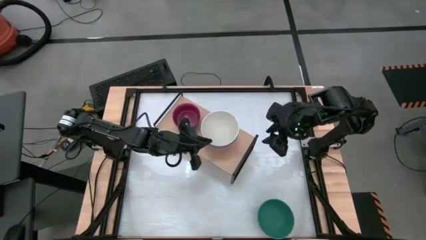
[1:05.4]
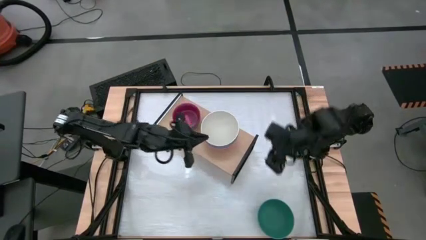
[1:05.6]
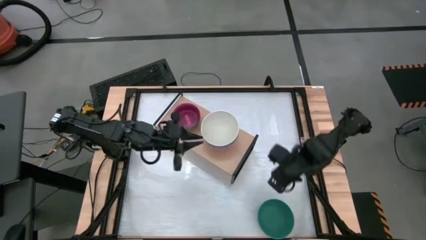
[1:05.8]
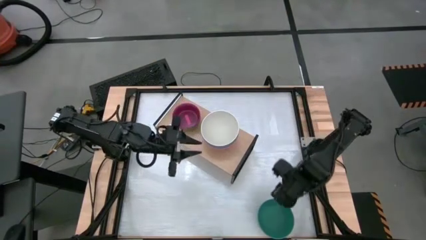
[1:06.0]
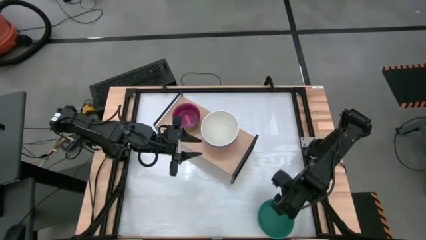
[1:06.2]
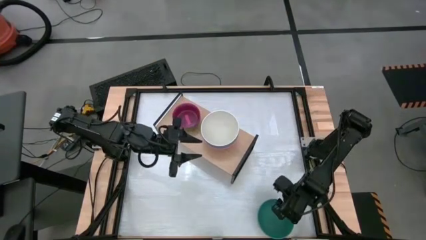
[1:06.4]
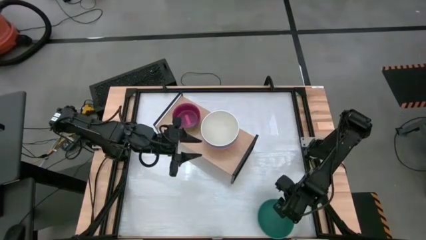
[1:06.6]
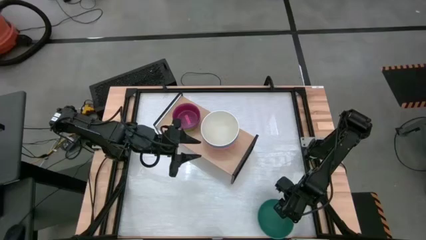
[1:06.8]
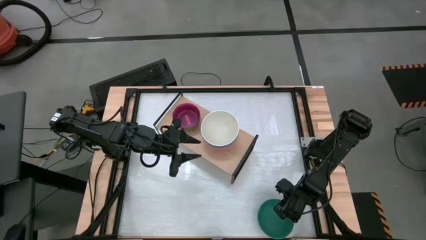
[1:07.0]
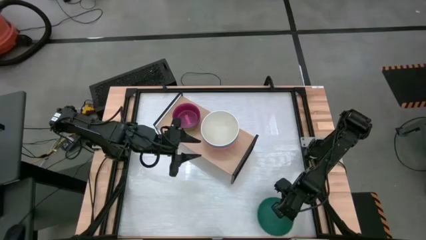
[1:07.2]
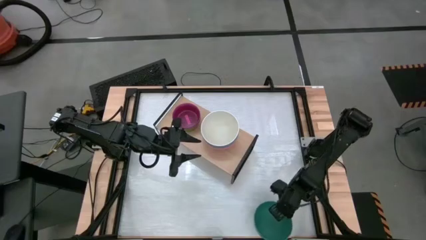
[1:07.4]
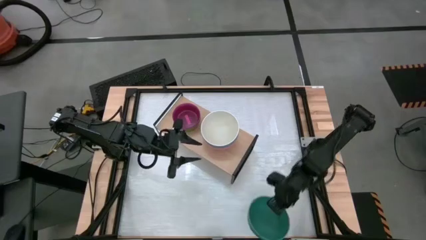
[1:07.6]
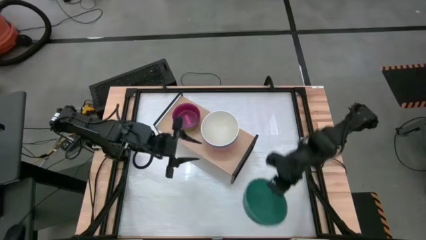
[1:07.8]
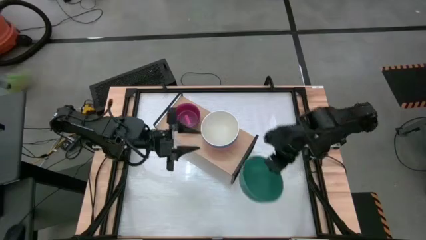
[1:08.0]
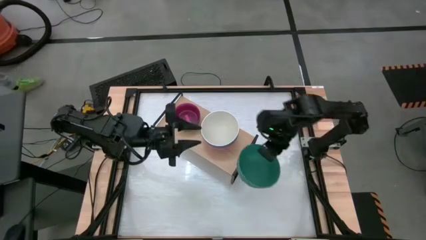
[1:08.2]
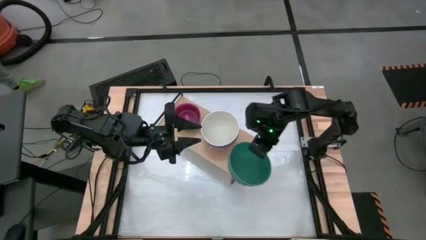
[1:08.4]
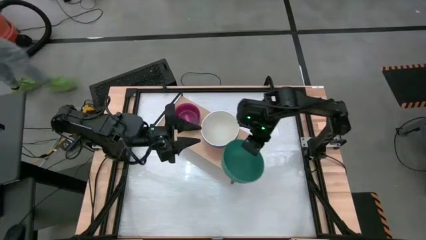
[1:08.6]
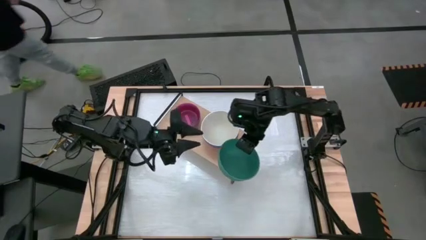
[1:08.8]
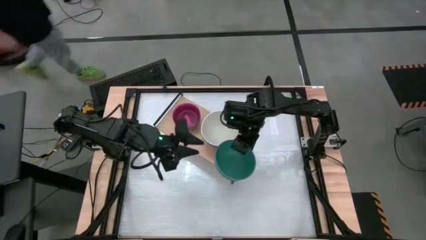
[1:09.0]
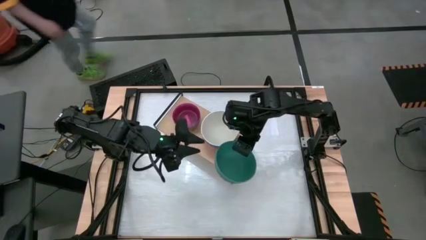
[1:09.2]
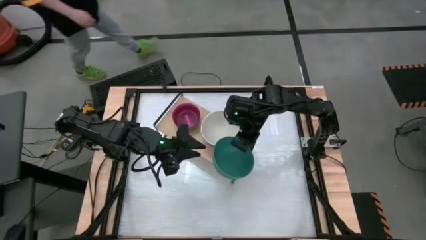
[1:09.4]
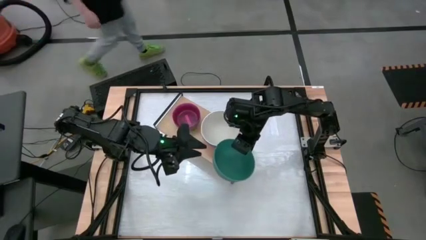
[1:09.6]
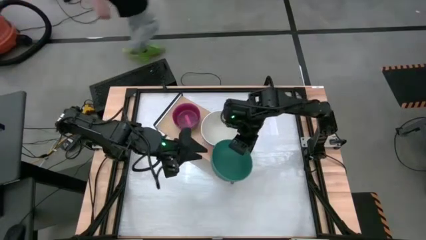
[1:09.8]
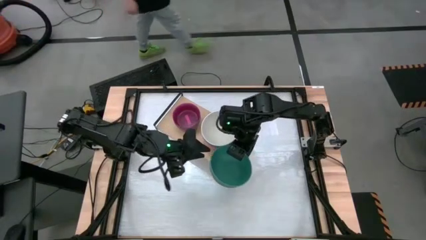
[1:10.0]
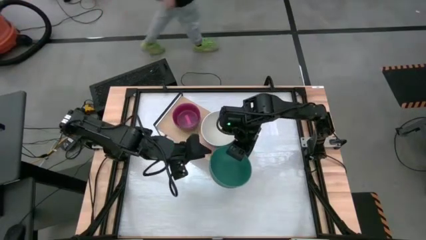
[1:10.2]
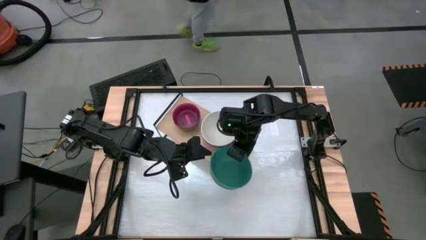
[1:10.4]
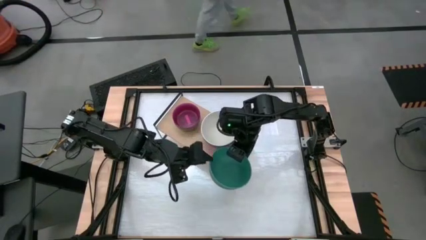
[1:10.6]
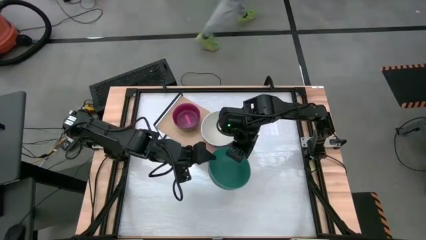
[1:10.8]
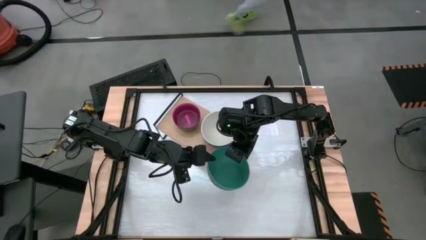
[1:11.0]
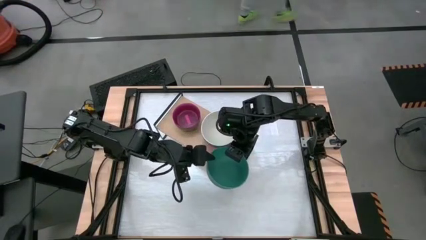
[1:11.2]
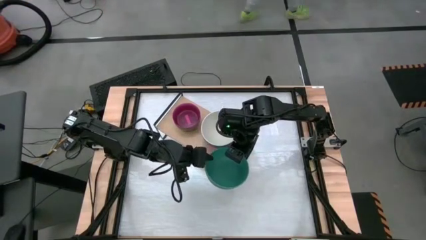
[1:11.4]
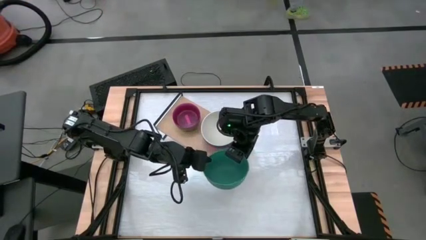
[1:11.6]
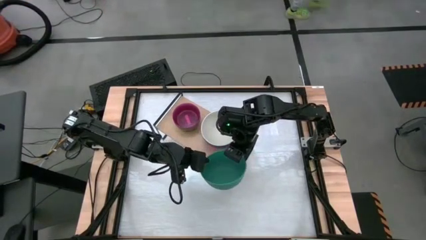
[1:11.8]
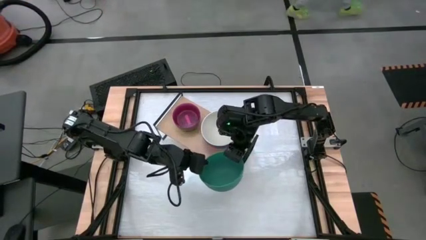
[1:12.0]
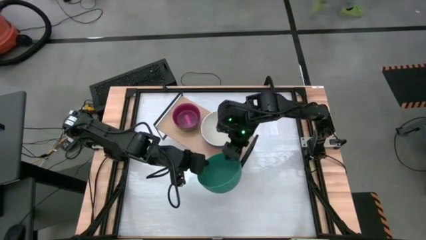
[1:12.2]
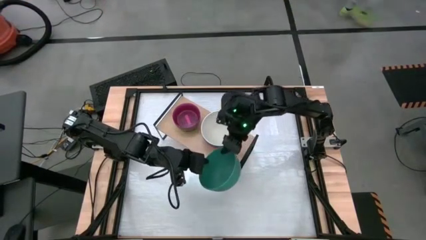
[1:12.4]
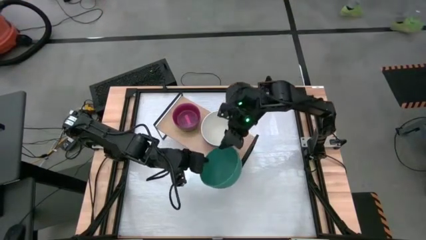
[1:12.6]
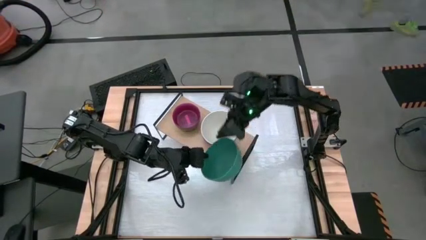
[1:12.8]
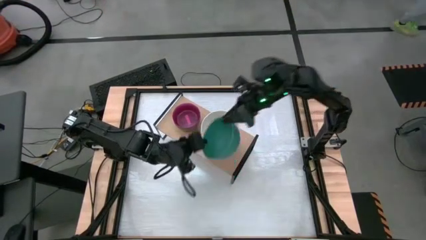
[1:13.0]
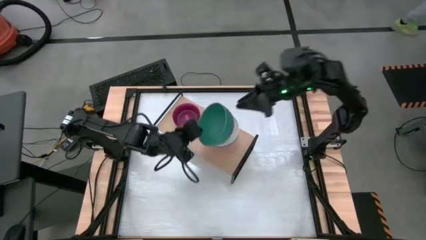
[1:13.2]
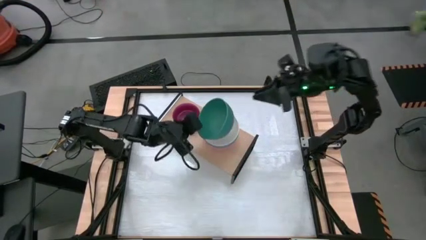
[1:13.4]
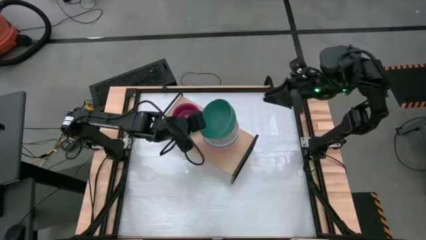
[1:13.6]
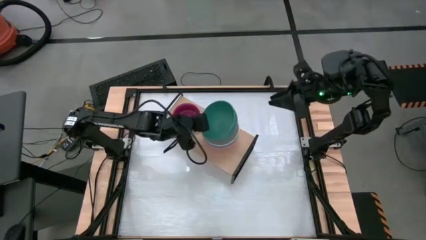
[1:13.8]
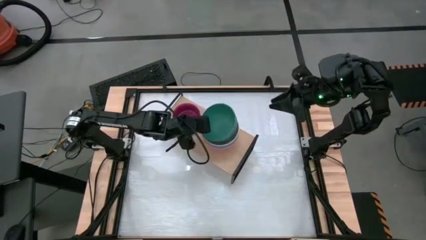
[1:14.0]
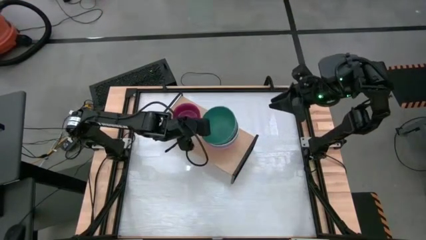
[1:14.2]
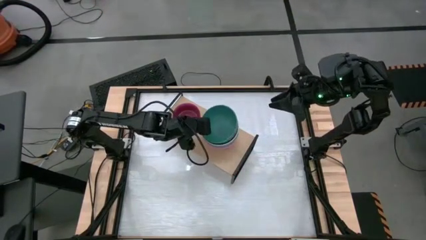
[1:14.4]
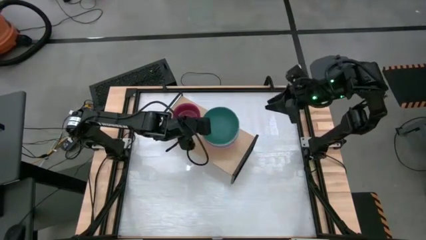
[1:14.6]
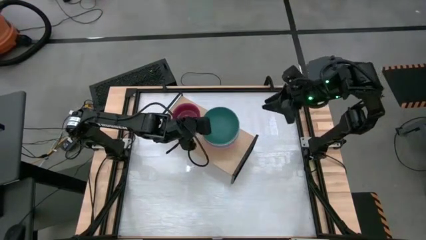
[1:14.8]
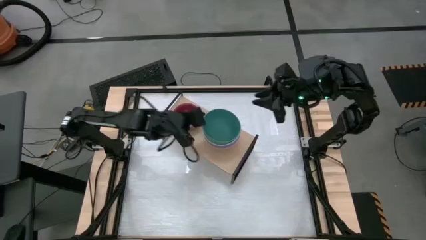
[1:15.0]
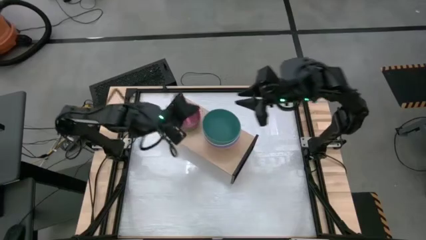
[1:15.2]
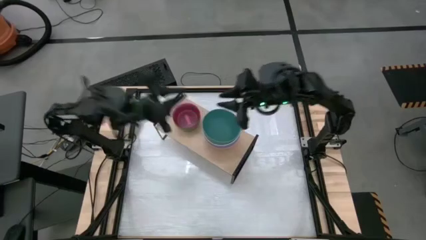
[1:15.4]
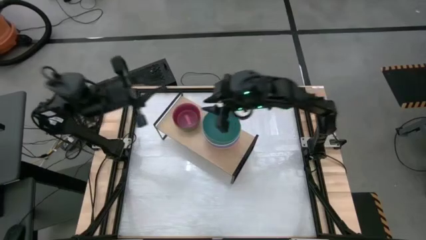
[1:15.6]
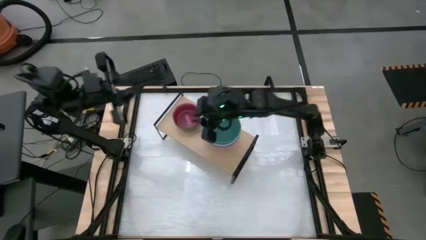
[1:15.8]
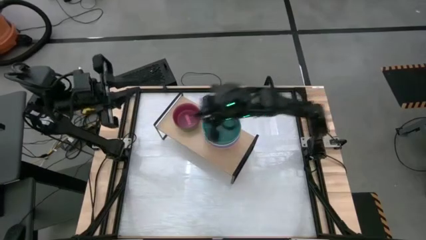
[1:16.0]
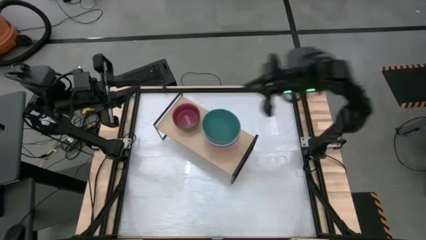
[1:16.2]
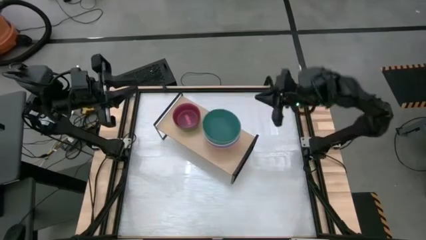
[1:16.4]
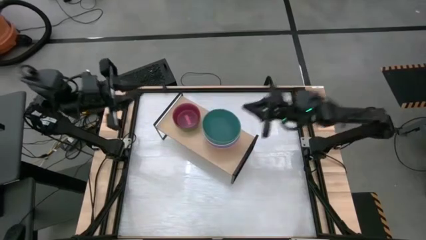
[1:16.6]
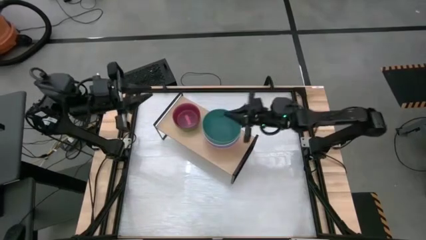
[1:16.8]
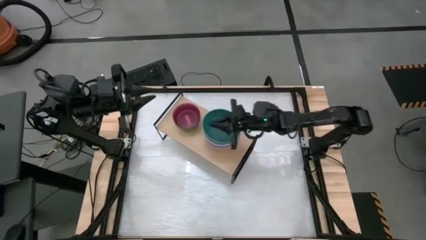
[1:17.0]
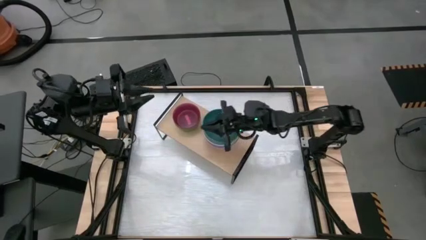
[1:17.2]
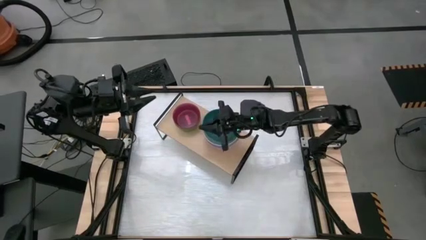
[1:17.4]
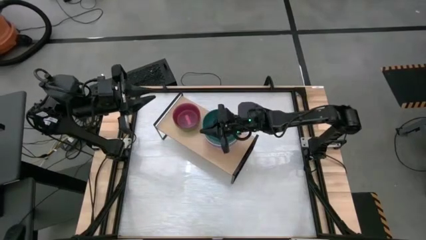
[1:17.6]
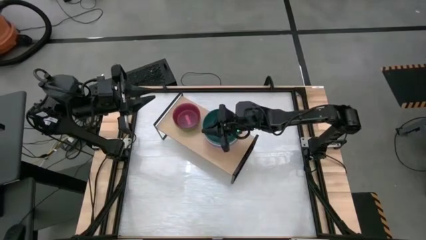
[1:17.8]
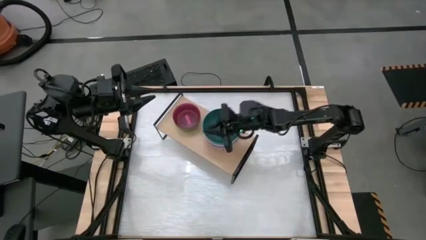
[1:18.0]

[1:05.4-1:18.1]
Task: Place and stack bowls onto a shelf
Stack the large dark green bowl on the top of the large white bowl on the shelf

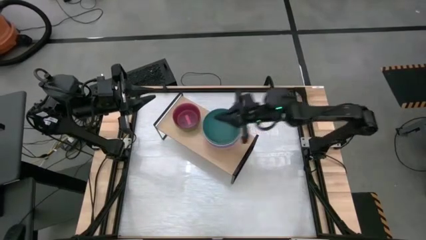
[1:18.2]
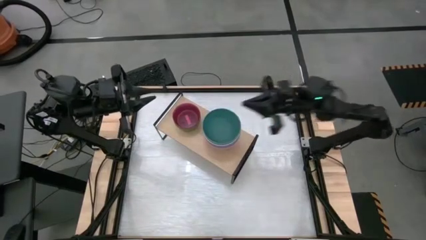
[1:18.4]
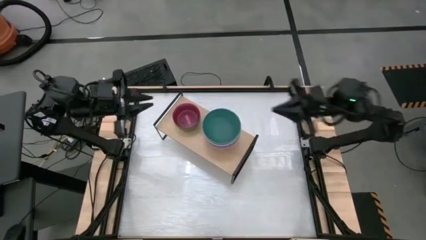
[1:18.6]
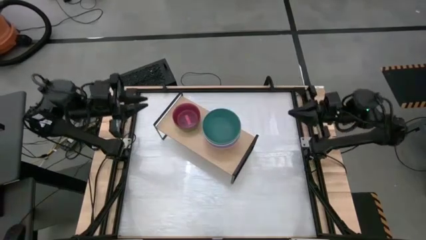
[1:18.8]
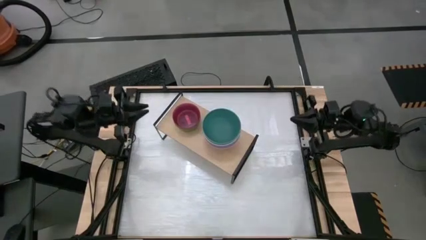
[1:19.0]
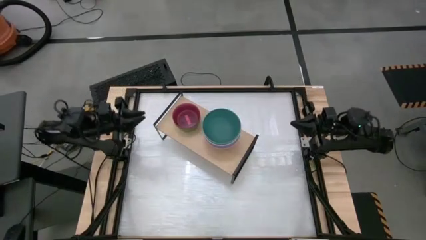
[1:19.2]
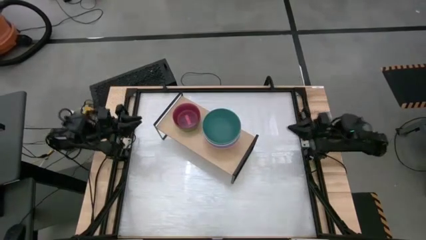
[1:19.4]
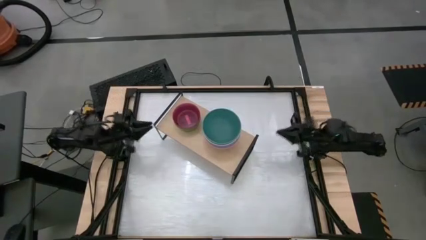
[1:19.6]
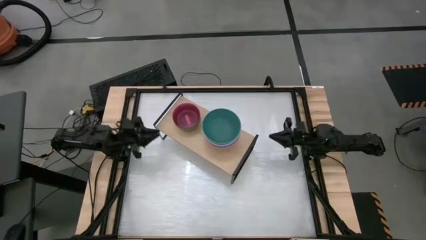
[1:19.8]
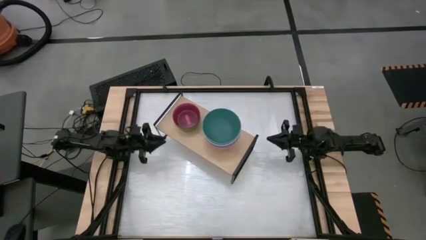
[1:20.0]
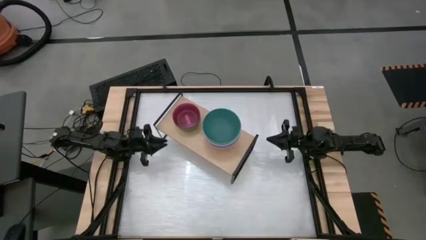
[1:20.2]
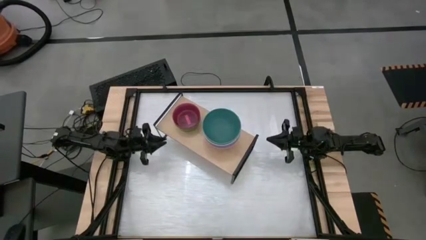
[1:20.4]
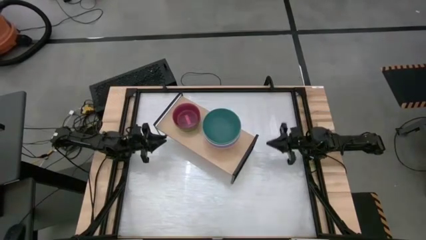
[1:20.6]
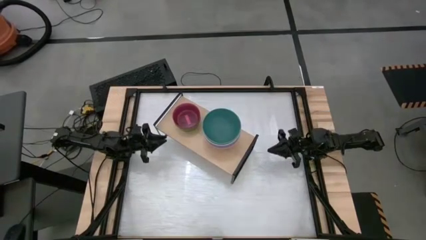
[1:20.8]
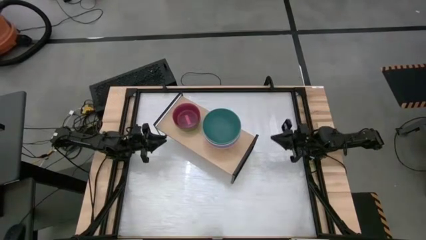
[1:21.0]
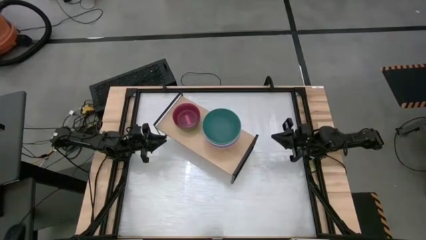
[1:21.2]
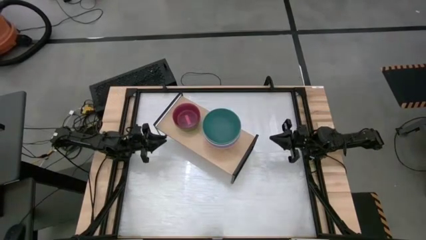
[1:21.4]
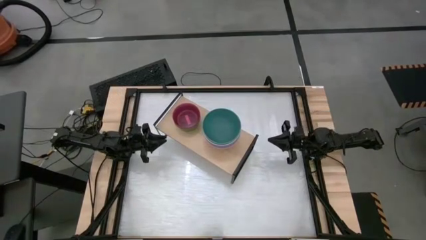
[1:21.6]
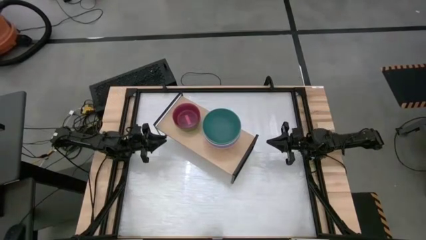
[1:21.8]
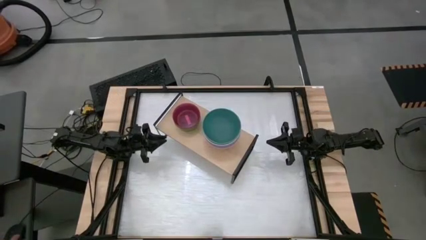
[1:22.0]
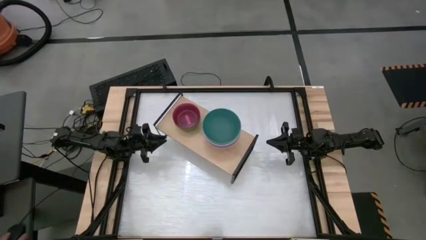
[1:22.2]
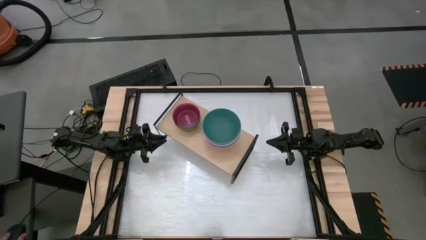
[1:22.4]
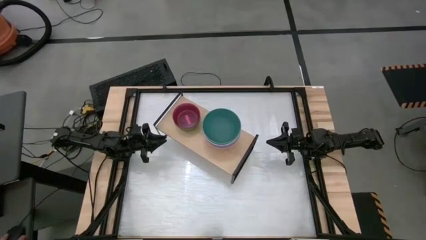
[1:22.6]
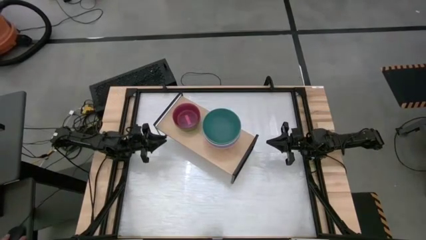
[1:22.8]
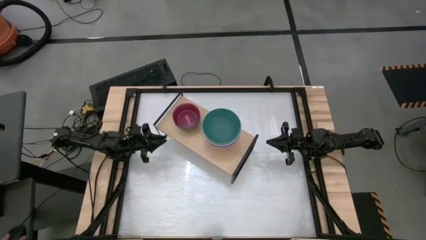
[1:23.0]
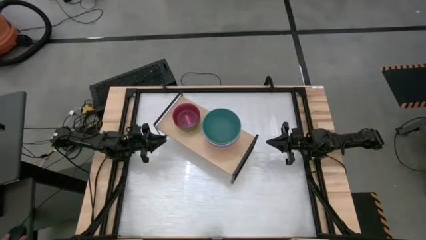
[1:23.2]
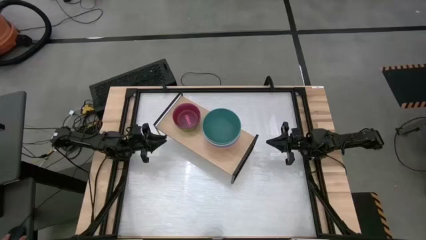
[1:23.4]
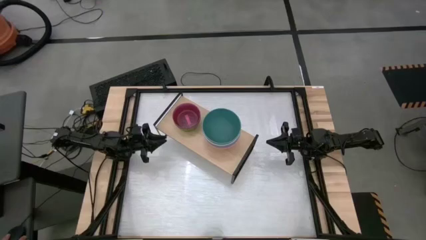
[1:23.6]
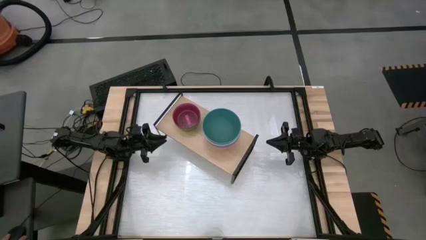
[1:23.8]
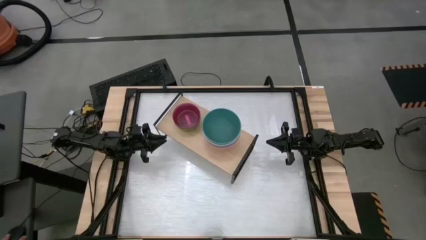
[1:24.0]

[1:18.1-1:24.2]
Return to Home Position
